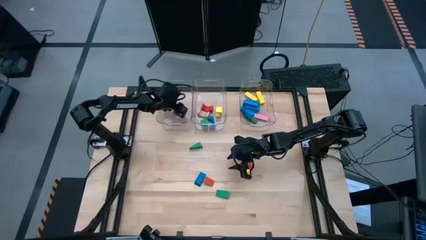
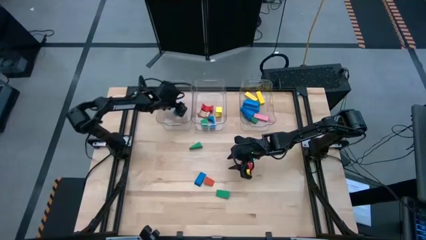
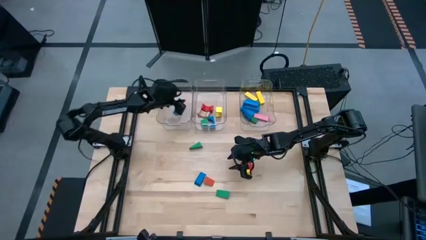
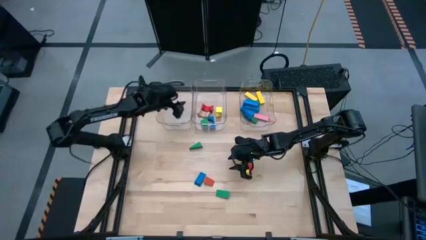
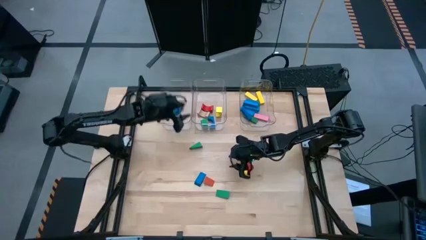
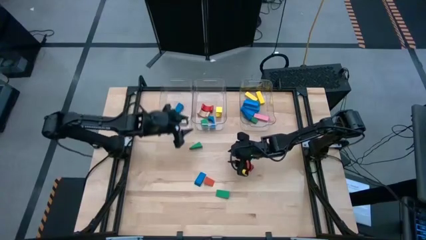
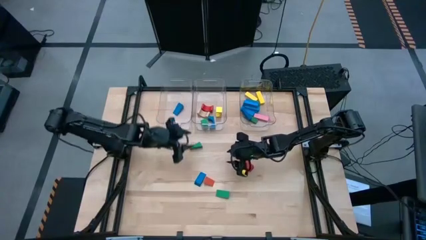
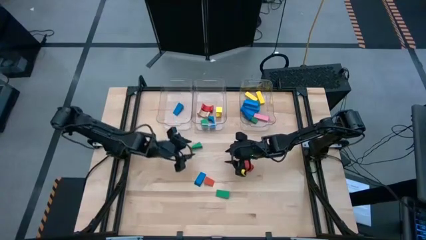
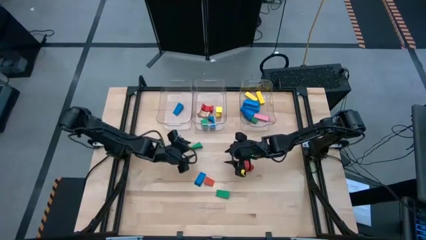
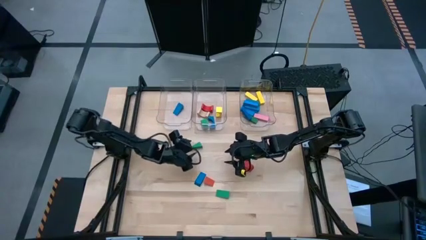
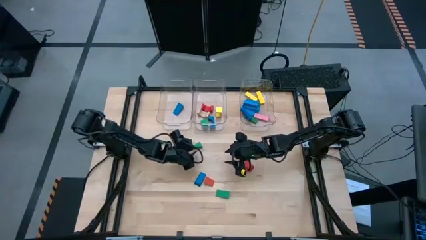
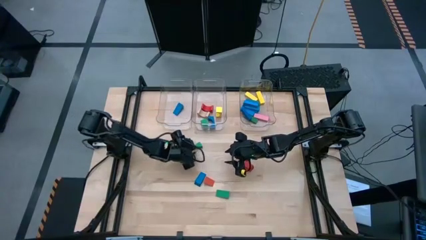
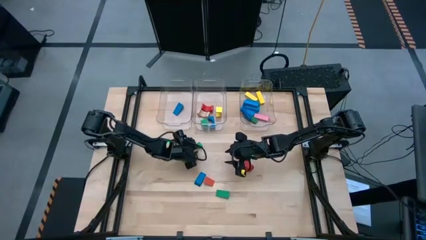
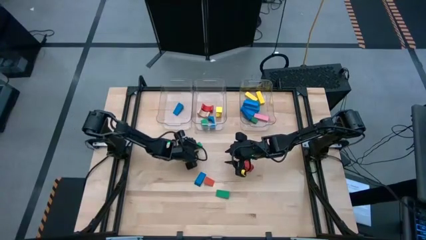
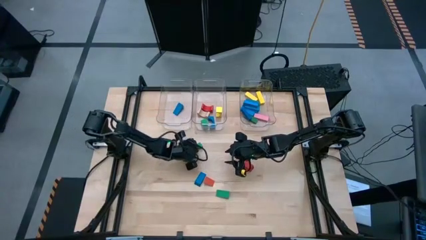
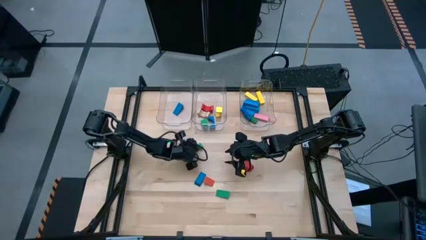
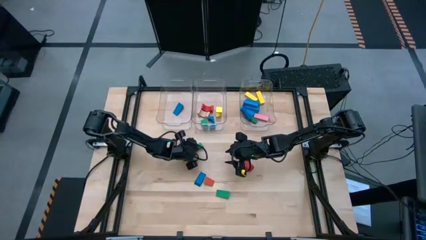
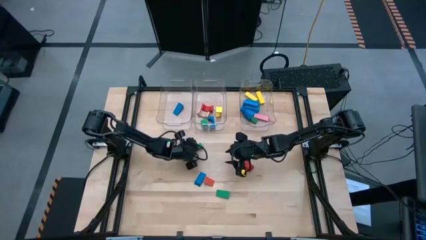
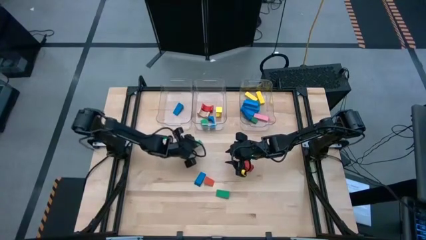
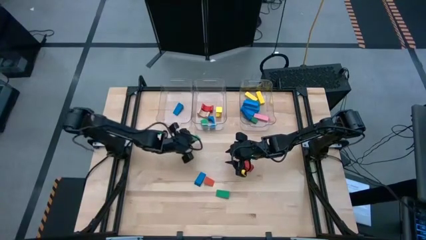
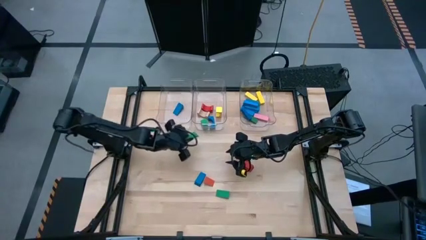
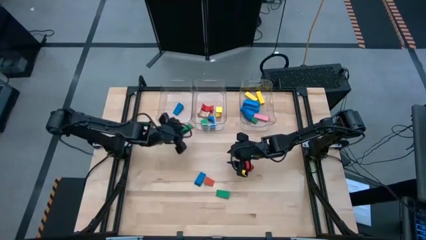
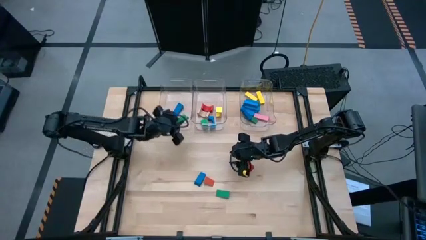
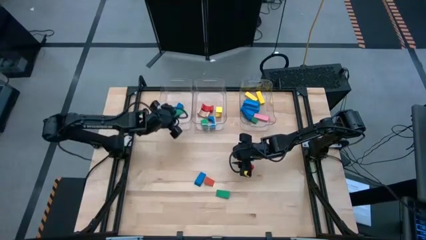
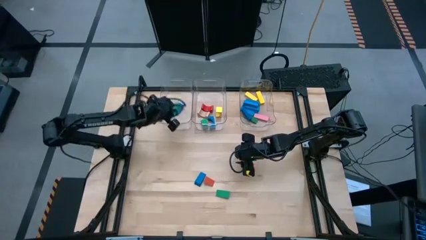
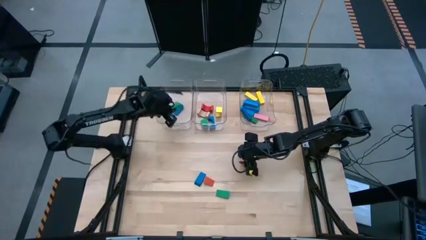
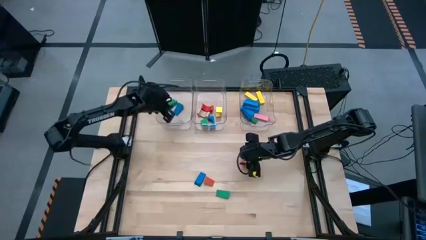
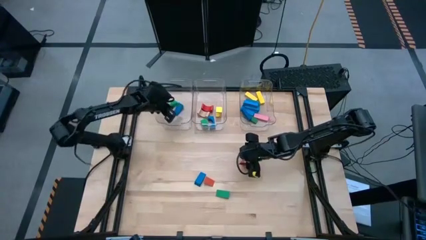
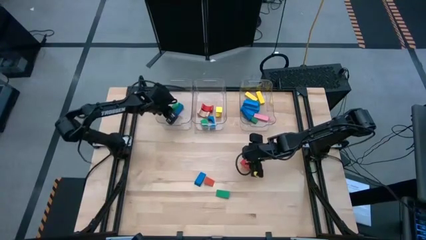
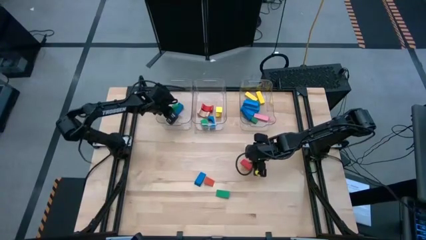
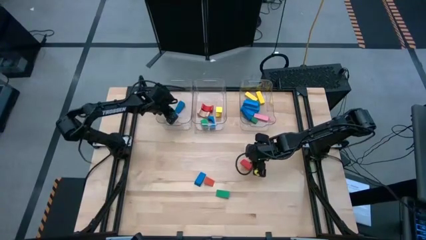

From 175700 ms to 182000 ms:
Task: Sort blocks by size
Put the green triangular block into the left transparent bin

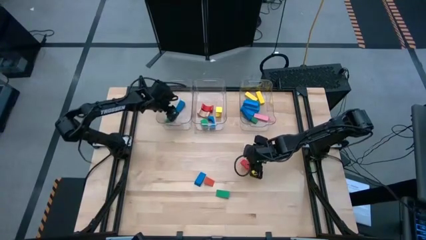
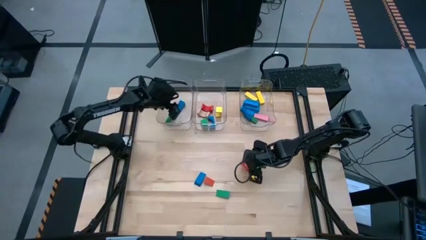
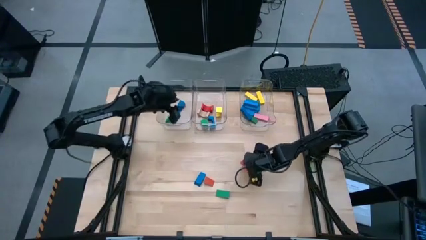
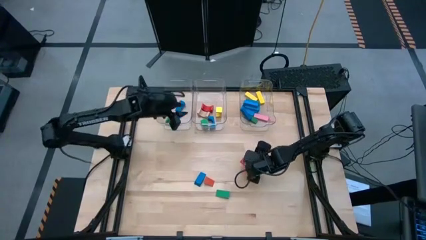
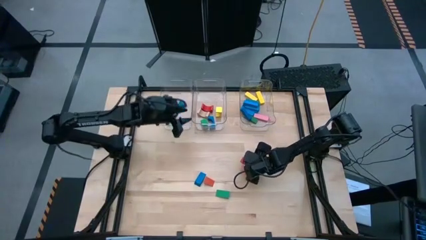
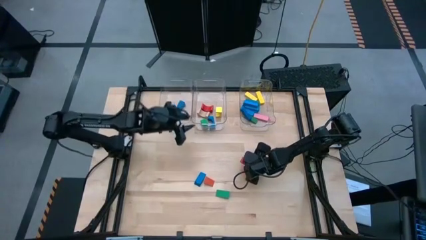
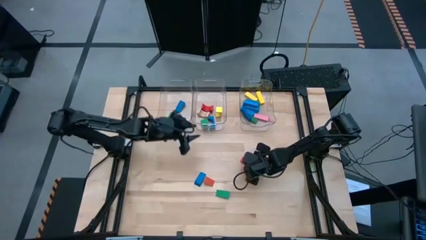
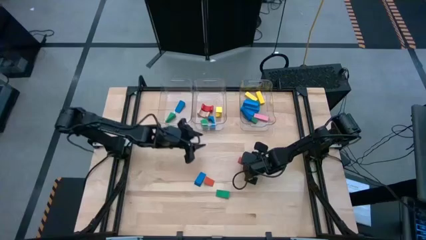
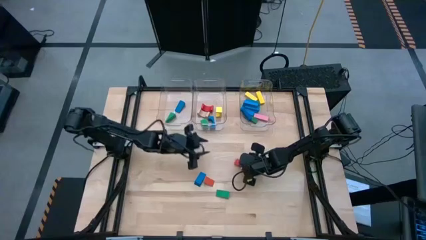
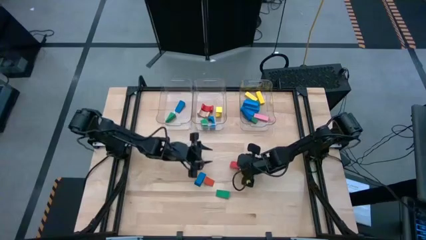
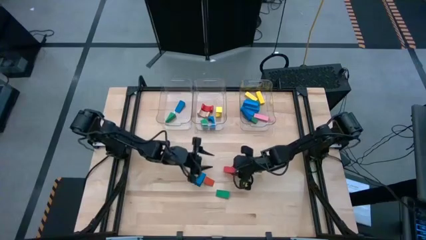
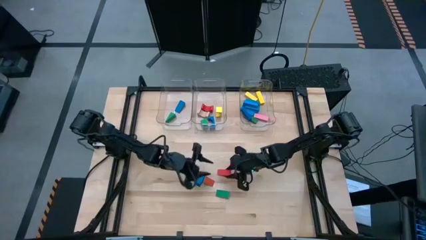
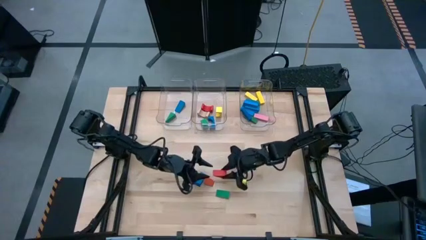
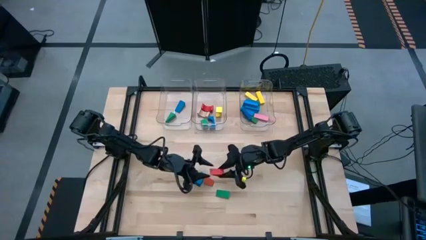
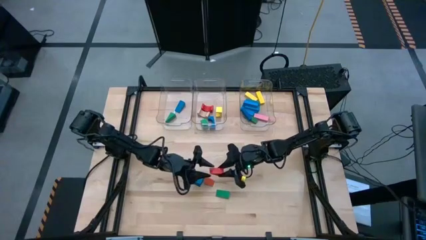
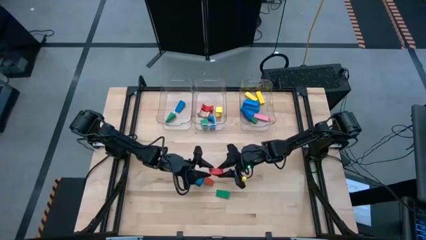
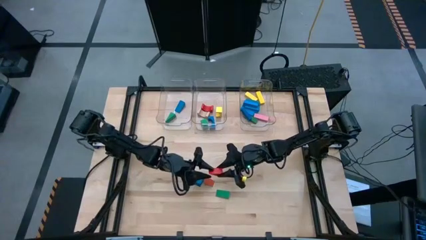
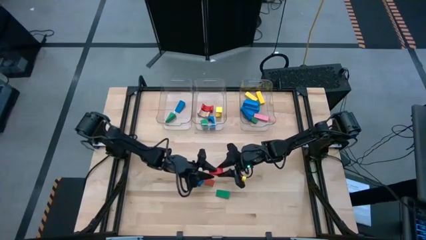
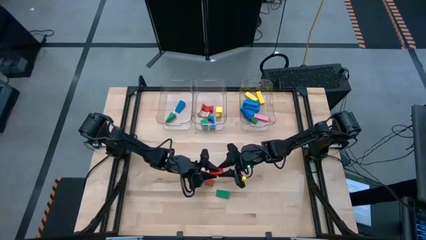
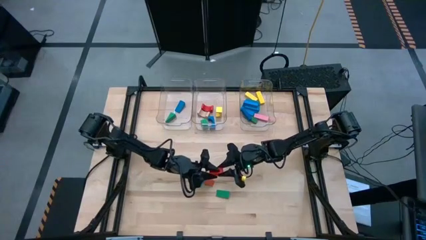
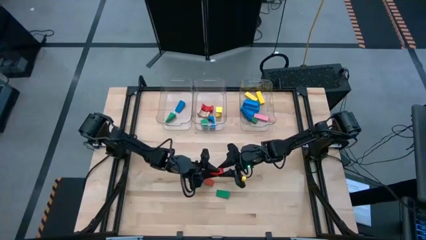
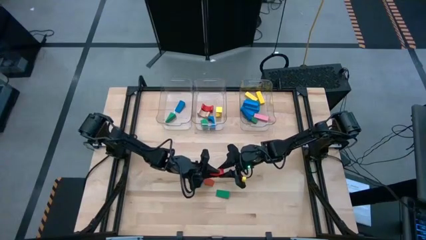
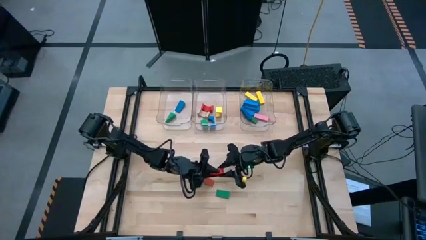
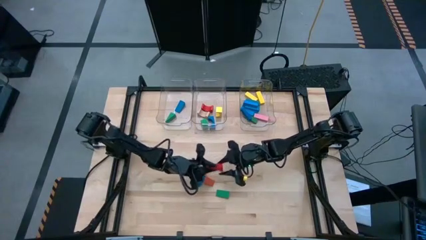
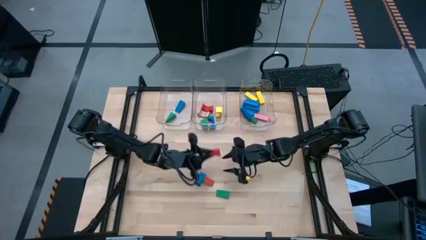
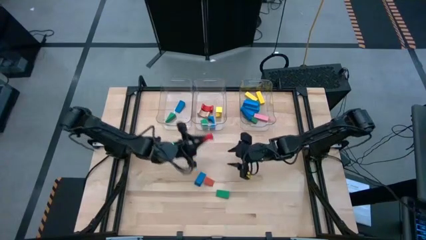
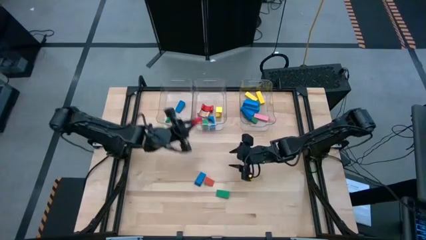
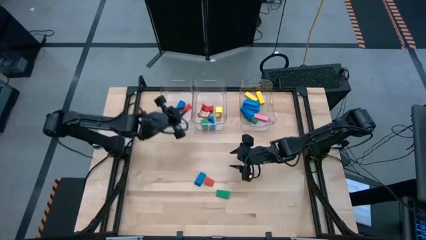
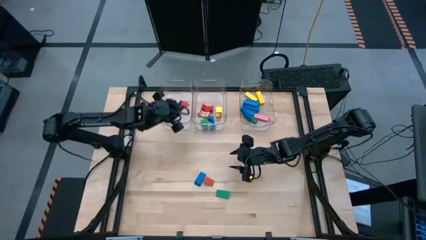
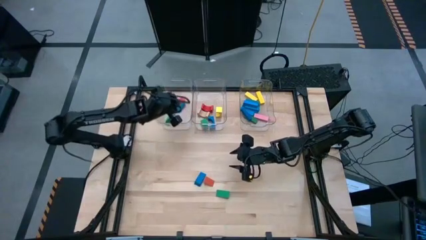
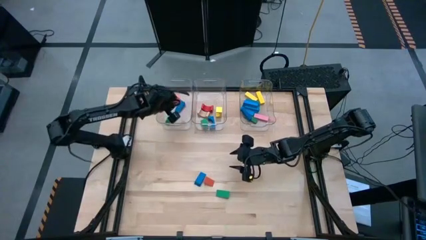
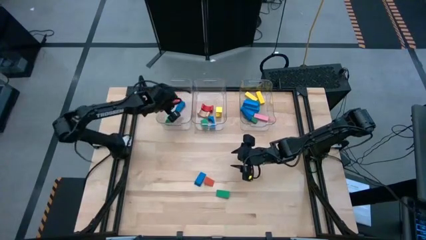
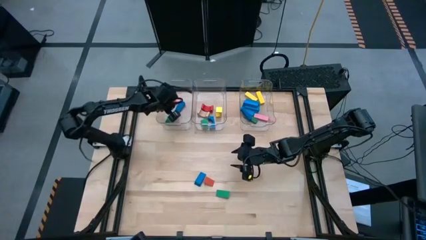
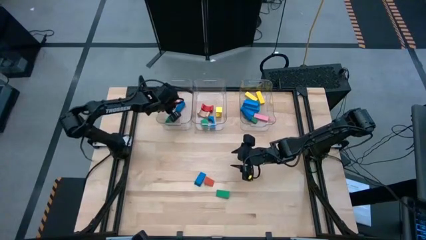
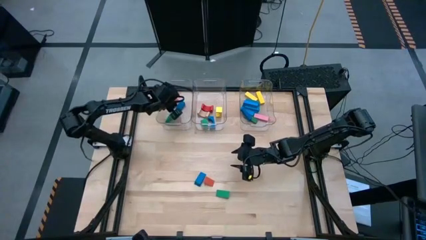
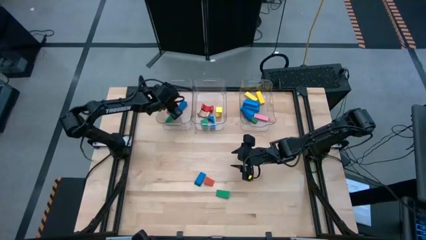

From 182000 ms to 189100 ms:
Put the red triangular block into the left transparent bin
